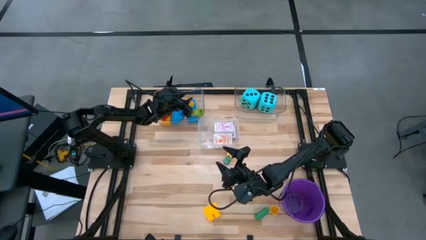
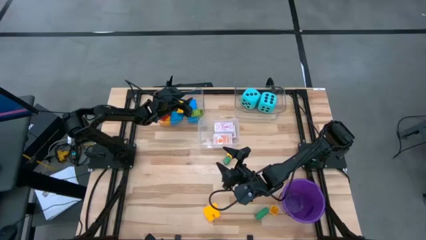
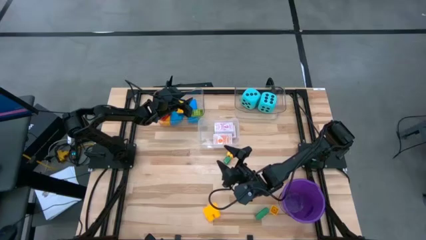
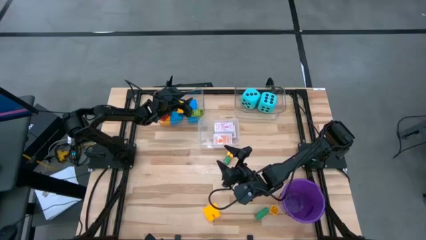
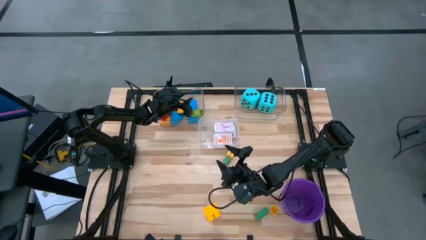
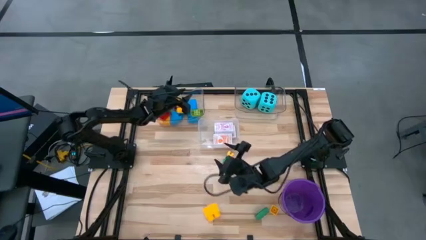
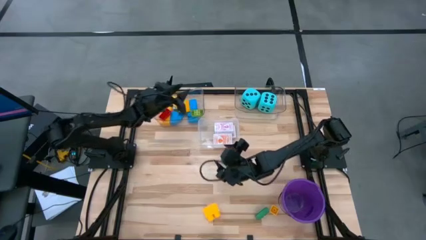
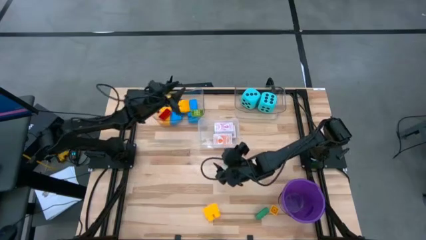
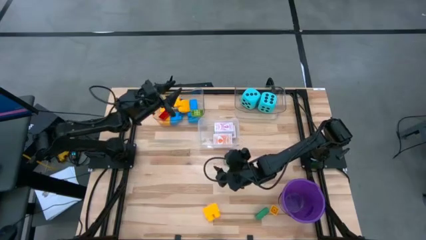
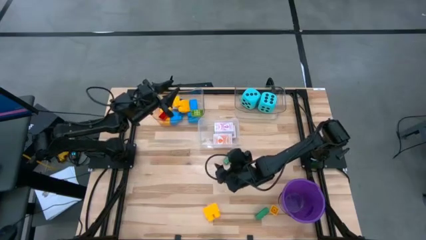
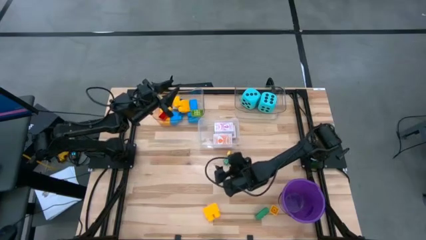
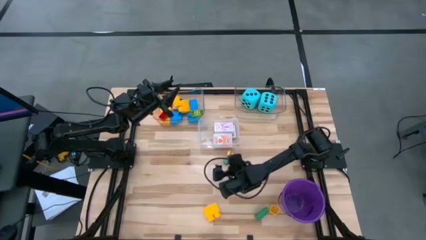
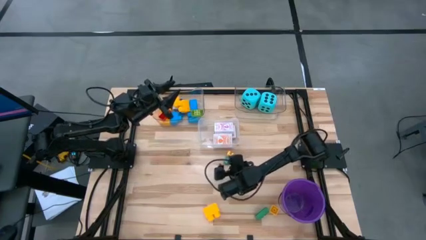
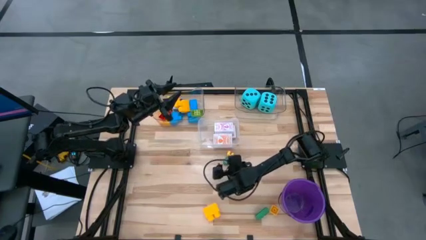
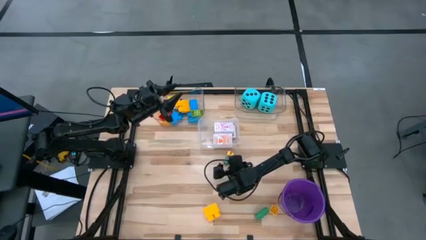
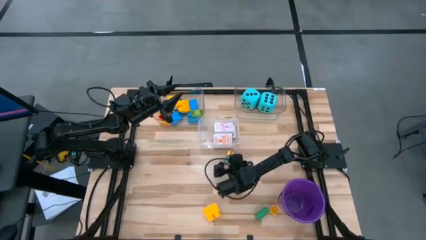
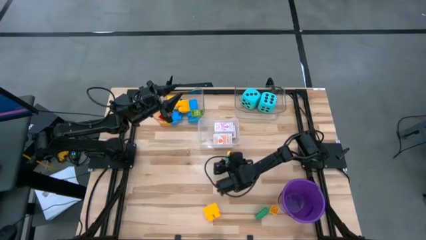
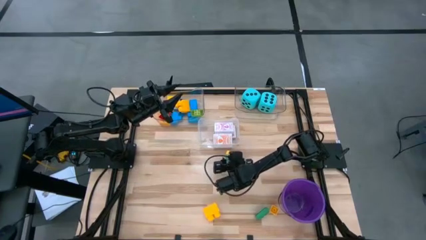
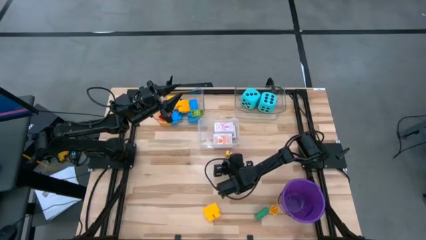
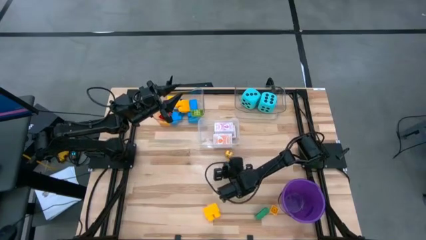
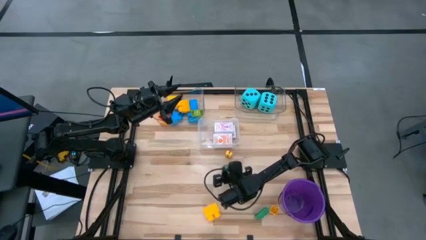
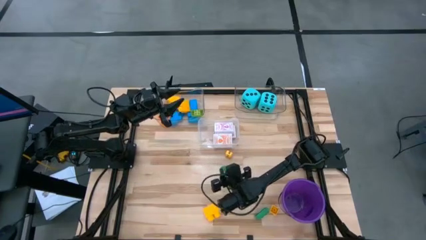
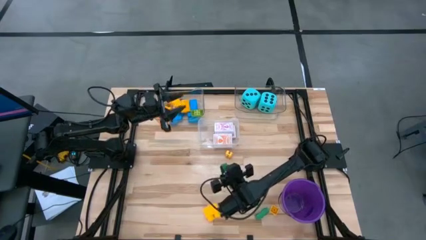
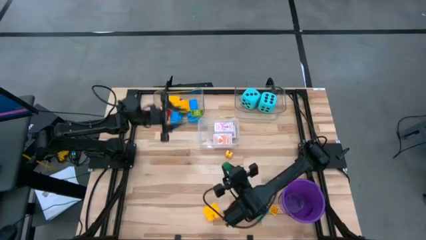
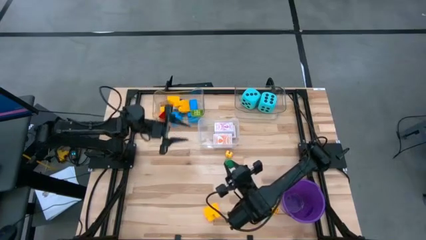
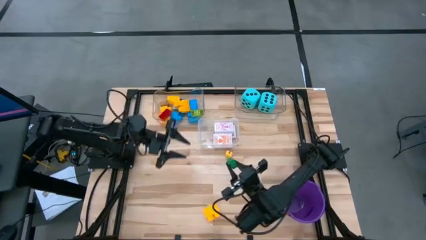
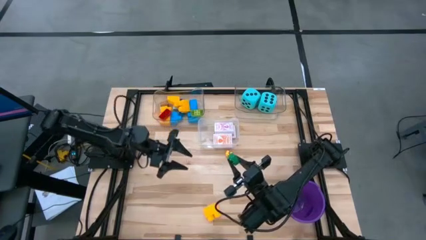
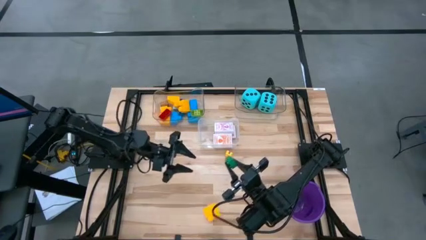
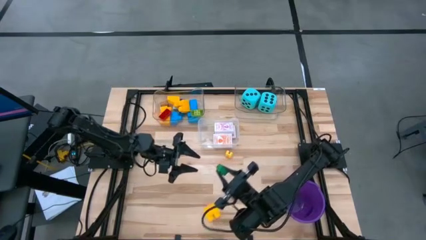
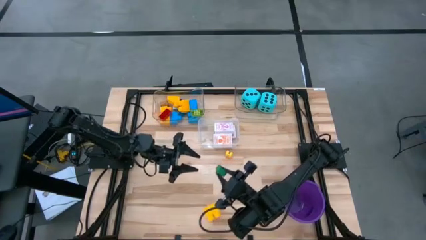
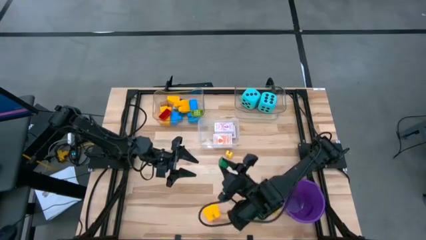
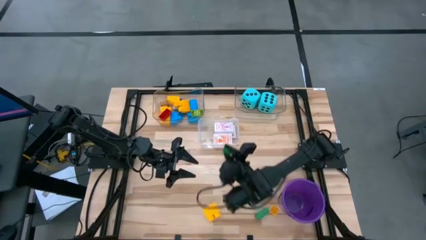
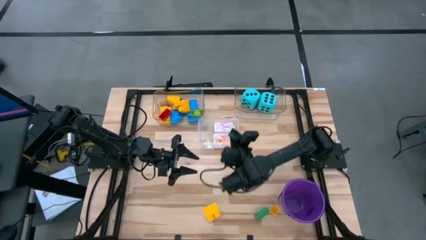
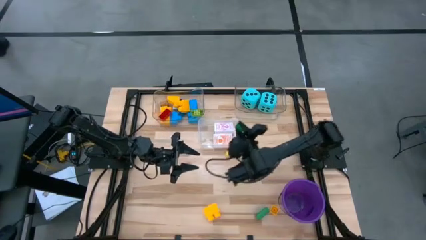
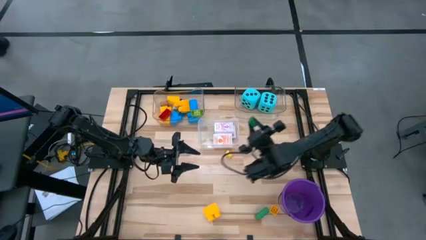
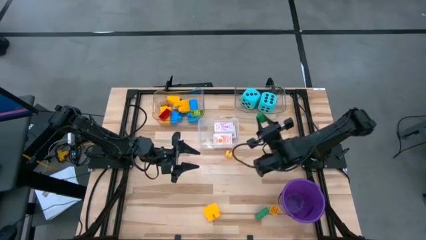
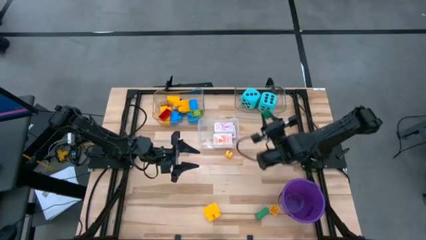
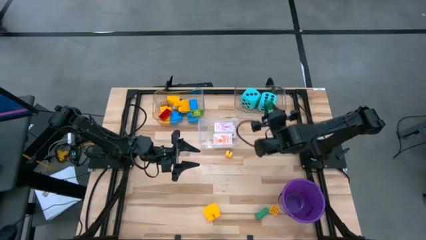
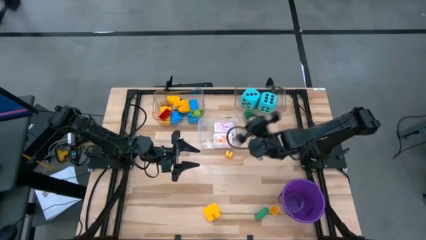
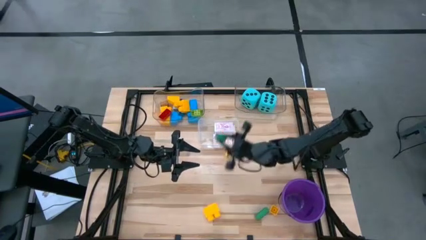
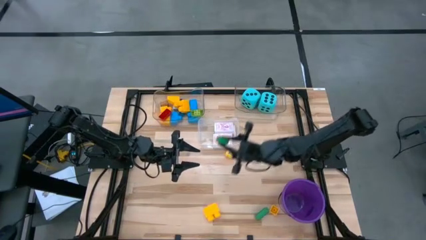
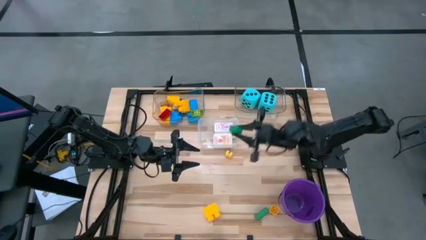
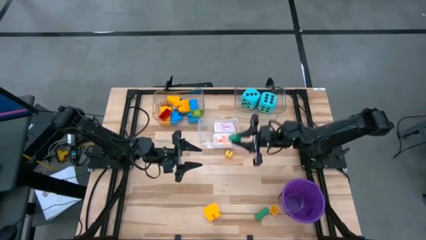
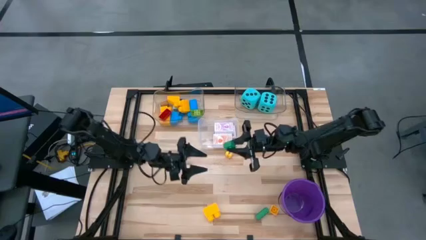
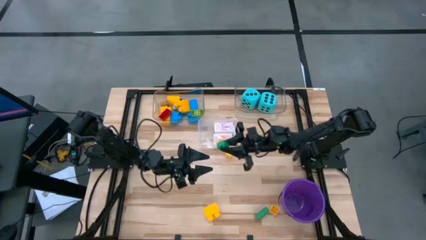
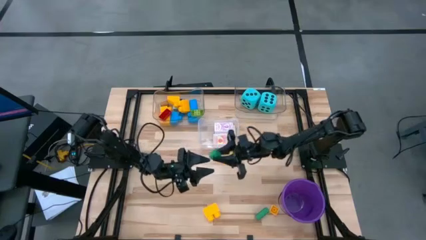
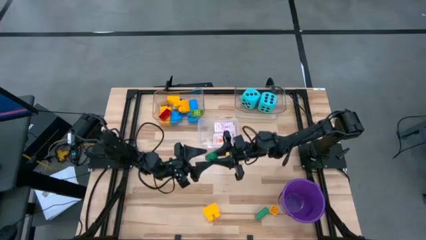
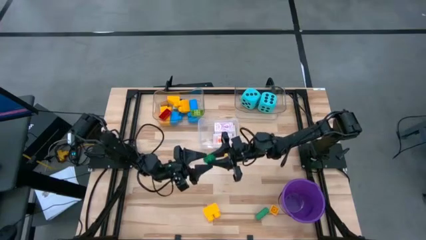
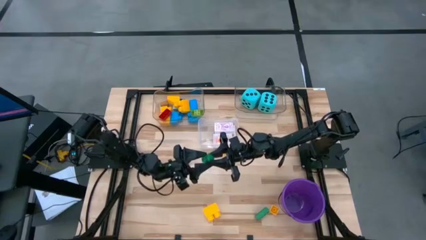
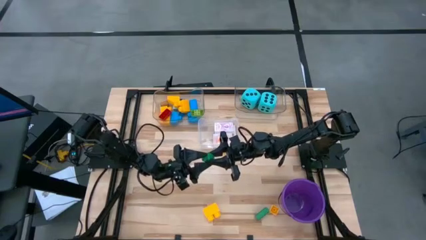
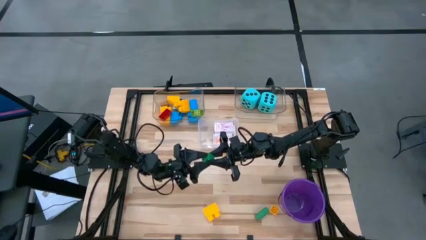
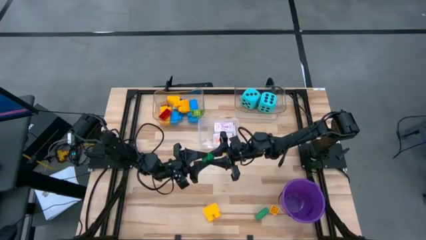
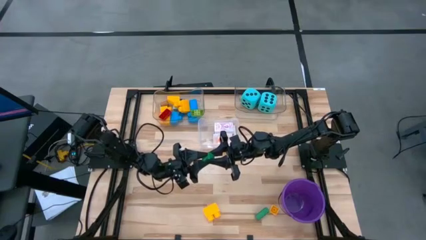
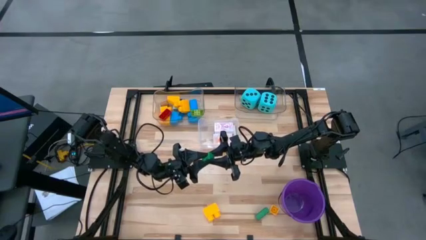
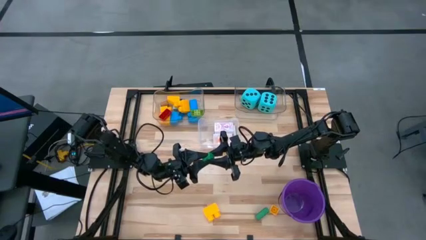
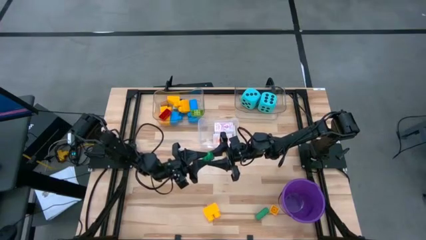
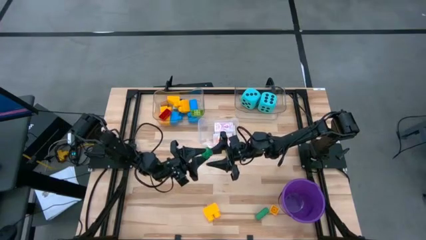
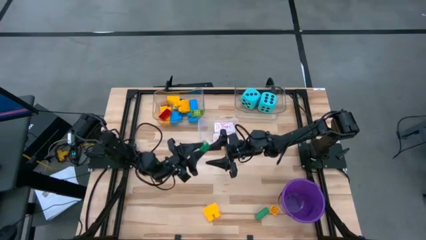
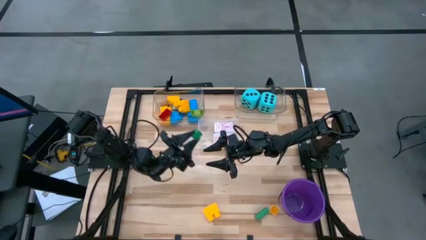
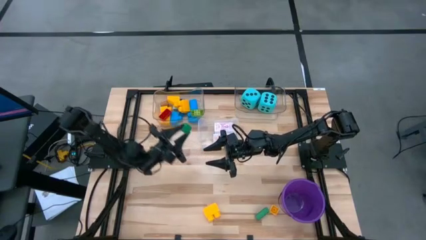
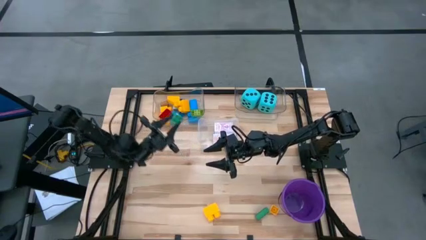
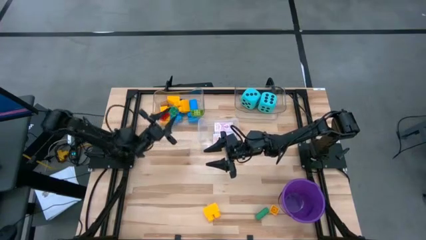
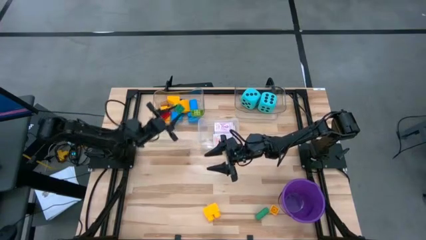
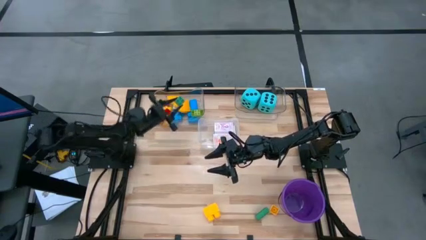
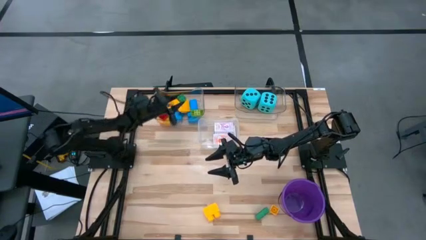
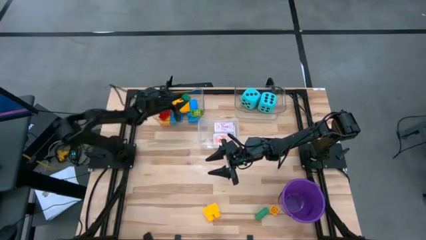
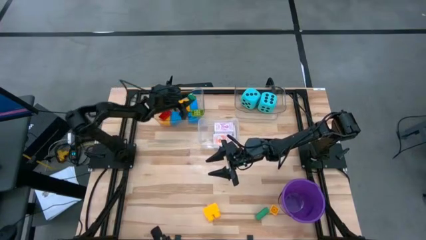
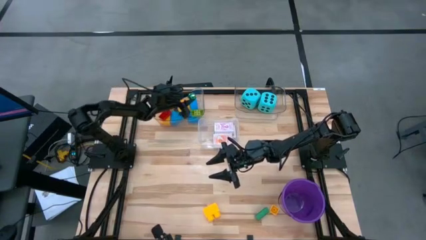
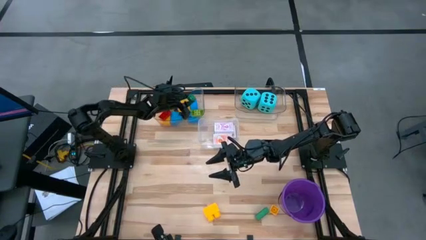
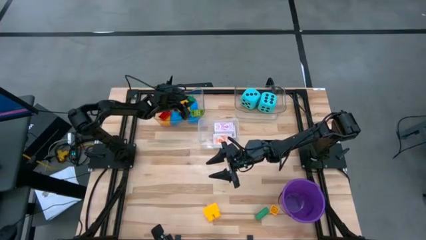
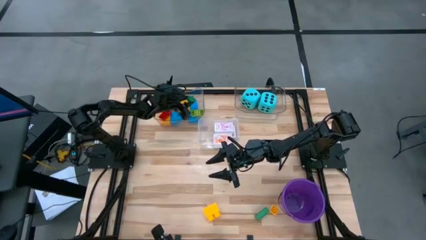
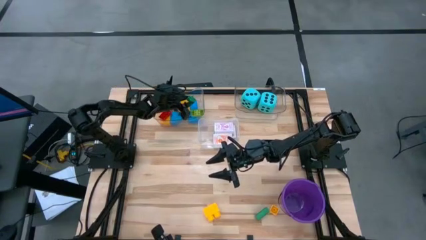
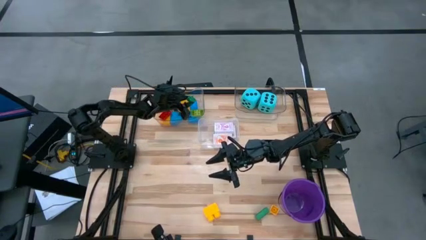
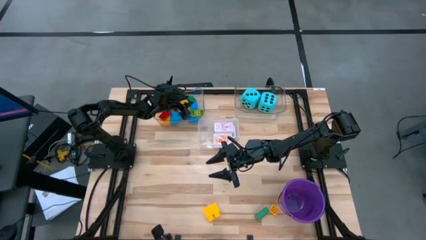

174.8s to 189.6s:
Task: Pick & Place Toys
Put the green game piece into the top left transparent bin

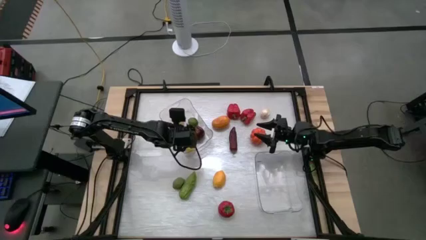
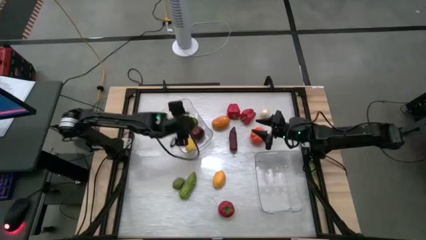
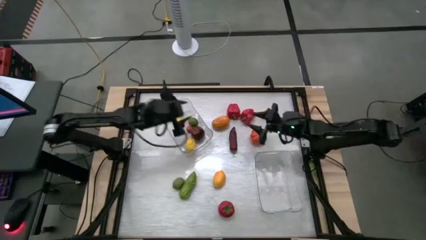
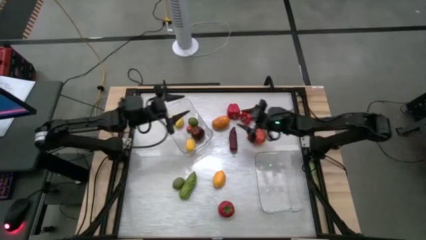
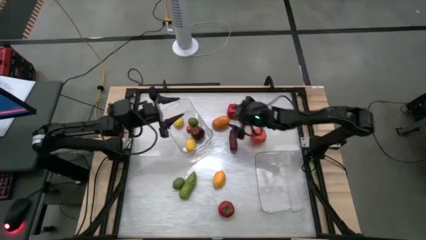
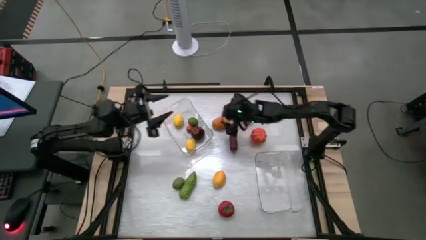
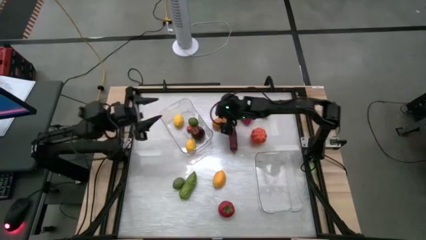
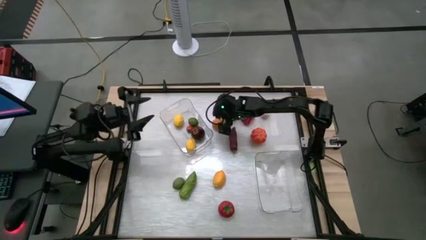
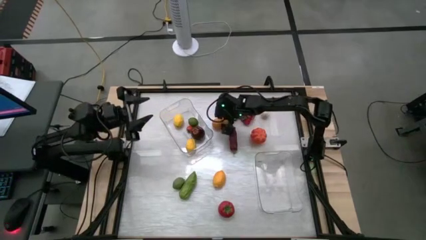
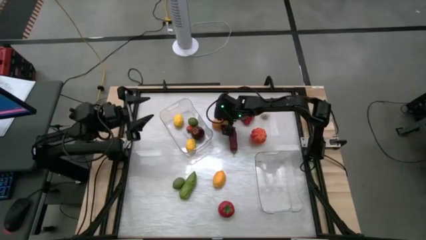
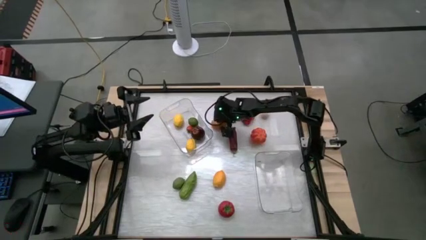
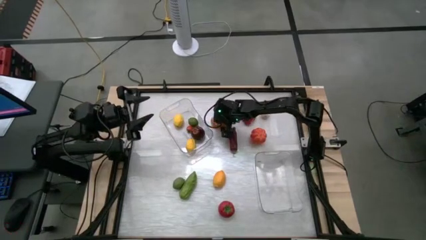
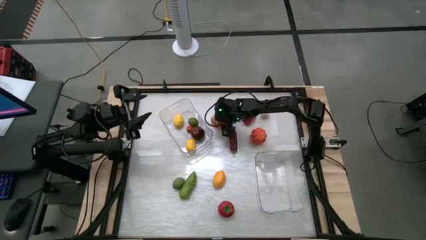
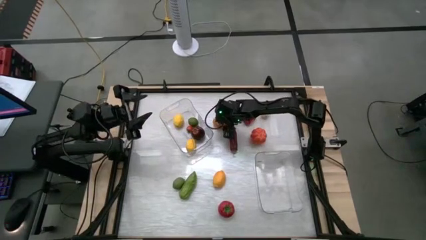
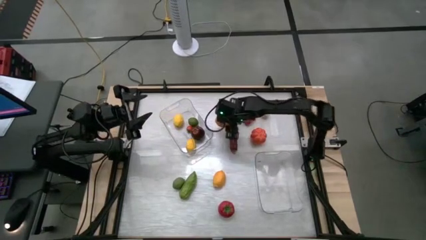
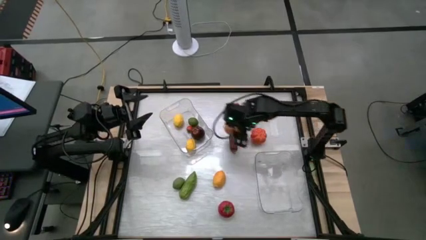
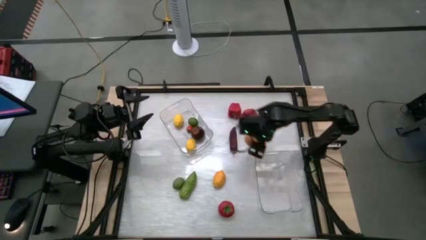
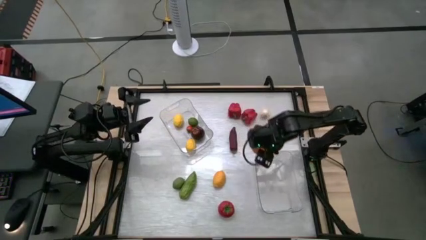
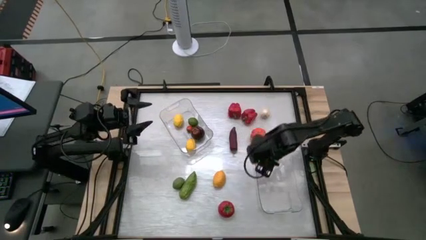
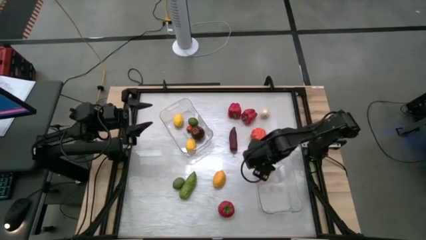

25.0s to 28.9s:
Task: Sort produce into baskets
Put the yellow mango into the bottom transparent bin
